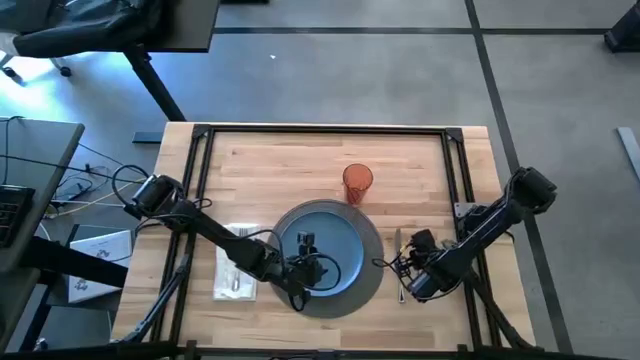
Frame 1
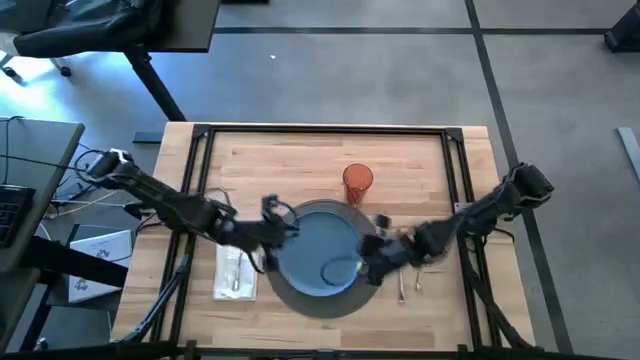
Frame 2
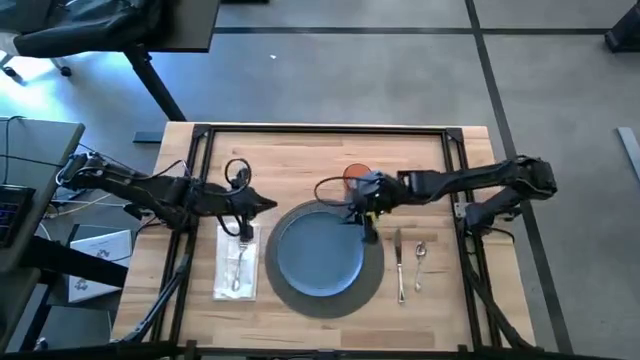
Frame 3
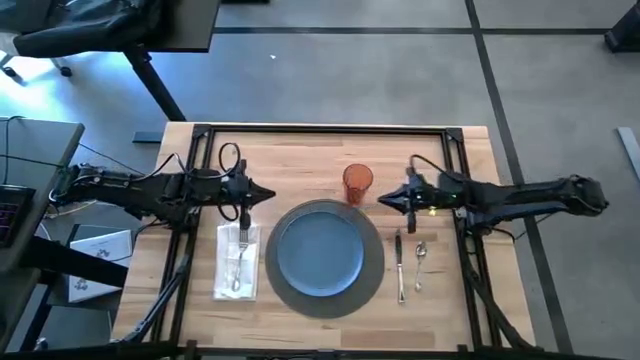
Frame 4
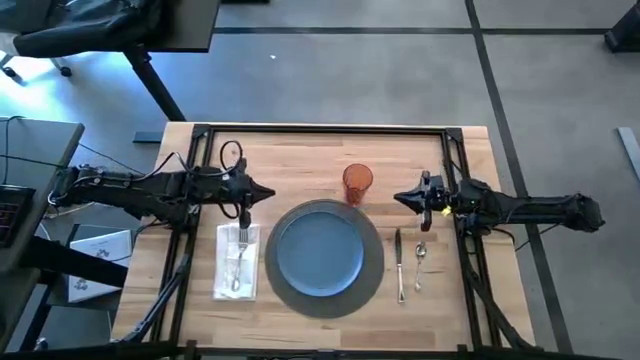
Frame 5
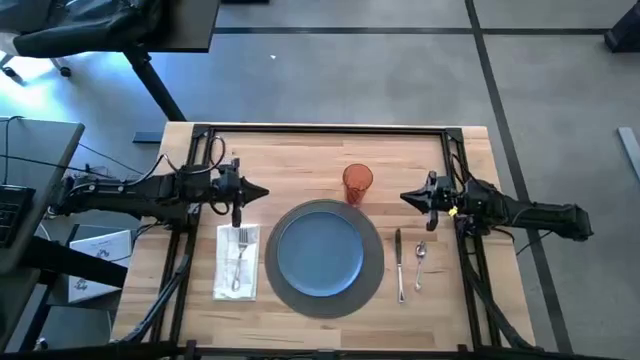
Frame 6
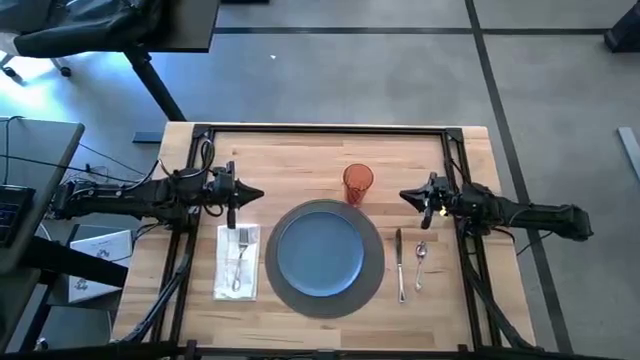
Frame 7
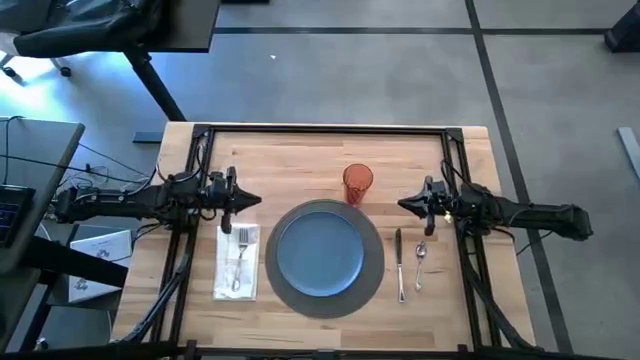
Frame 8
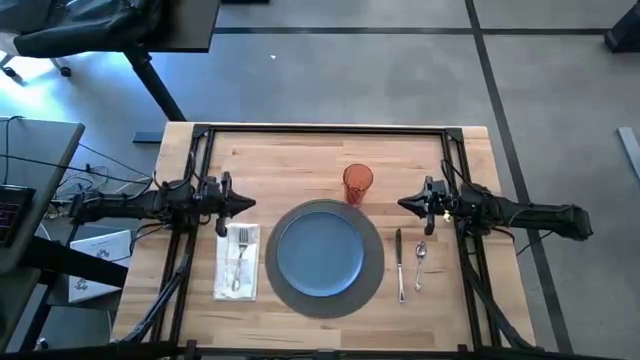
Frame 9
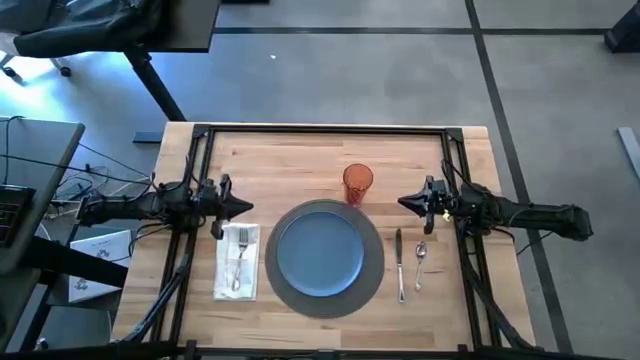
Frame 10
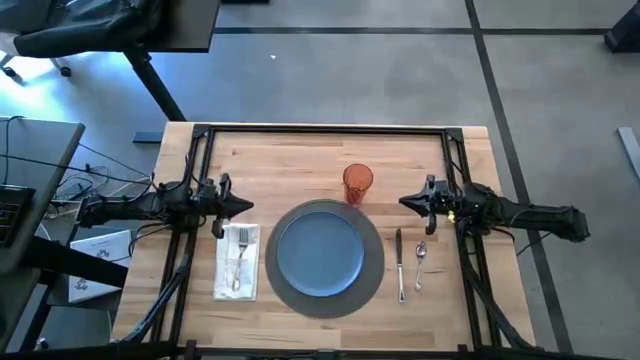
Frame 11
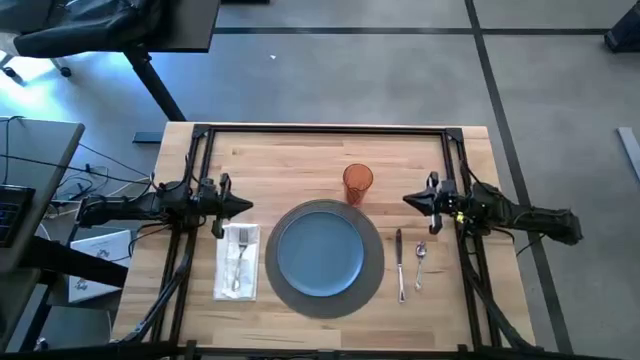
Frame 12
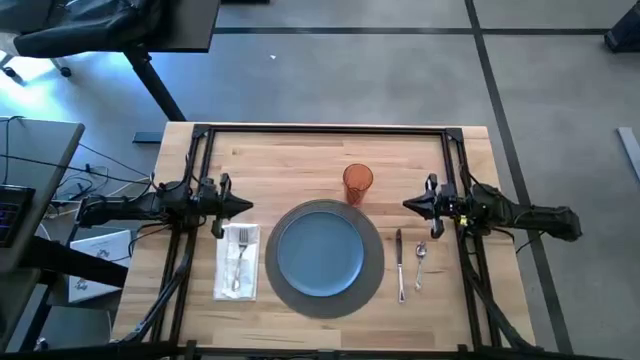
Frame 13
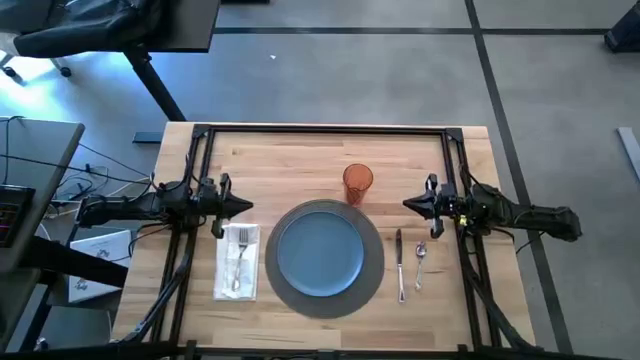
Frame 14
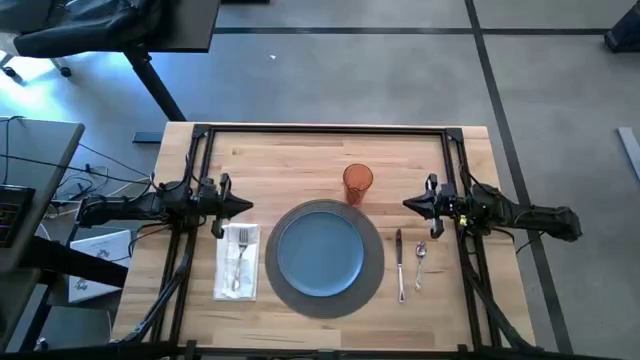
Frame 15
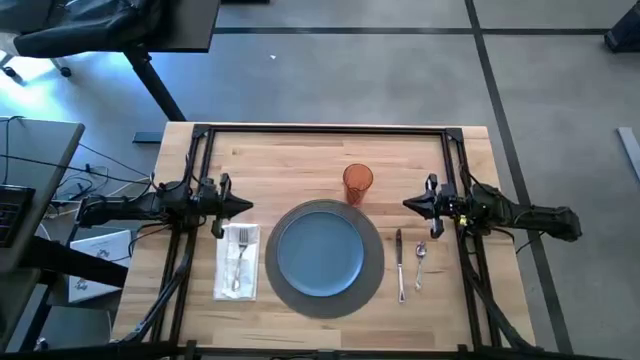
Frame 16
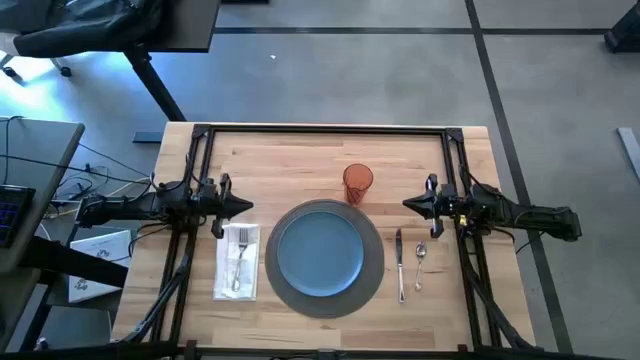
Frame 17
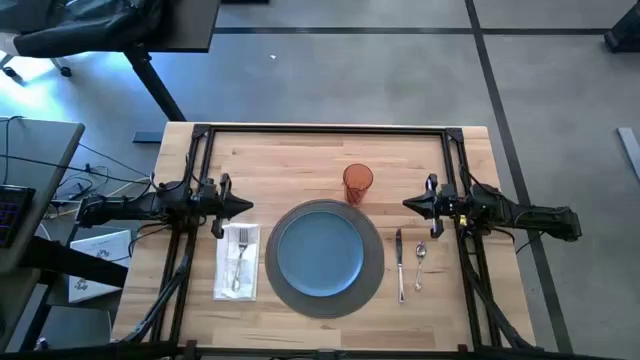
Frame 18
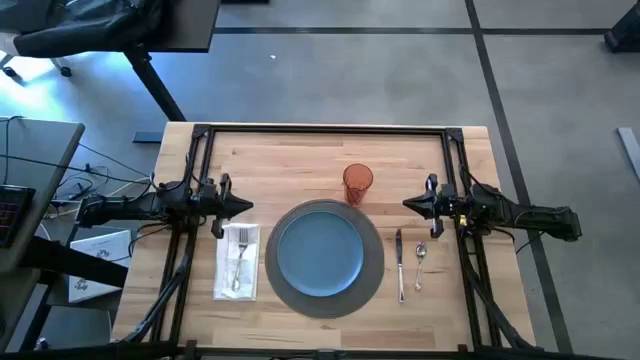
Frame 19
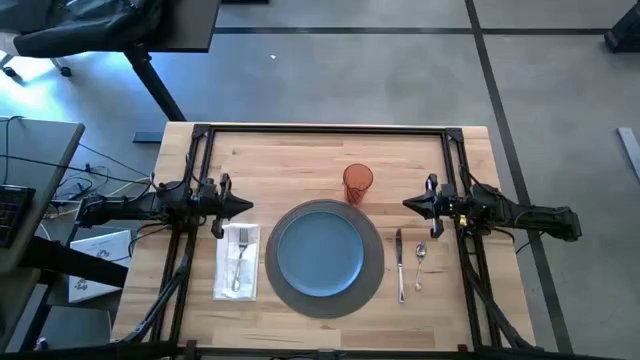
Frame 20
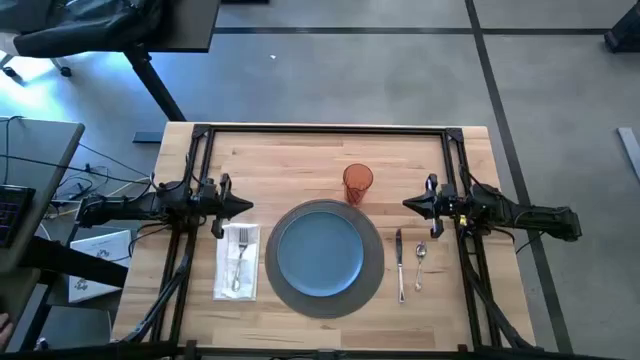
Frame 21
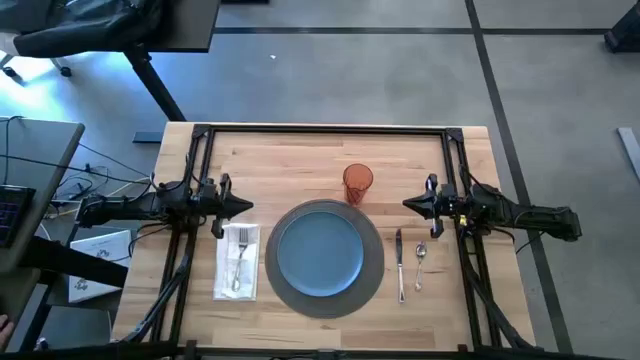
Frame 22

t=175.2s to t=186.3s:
Task: Set table place
Return to Home Position

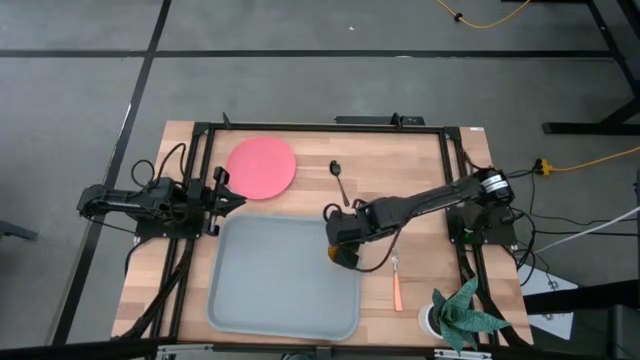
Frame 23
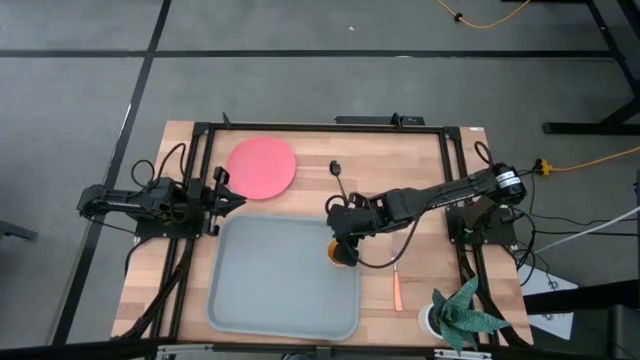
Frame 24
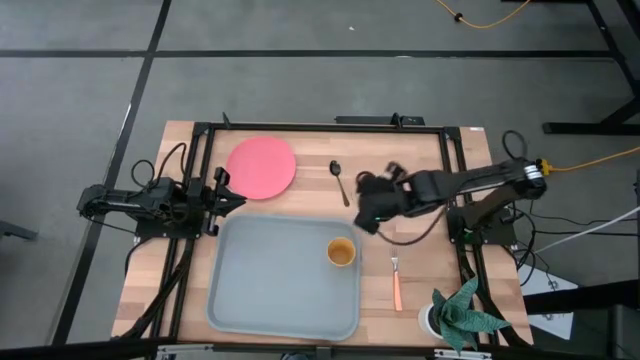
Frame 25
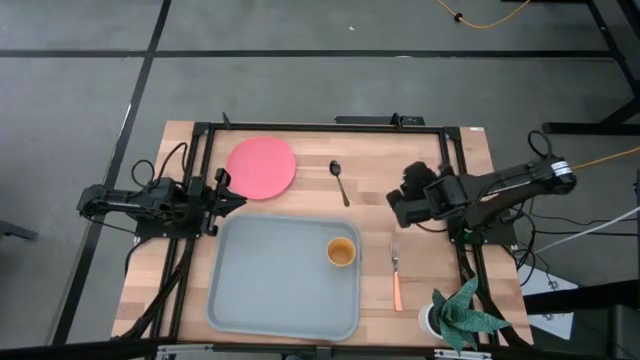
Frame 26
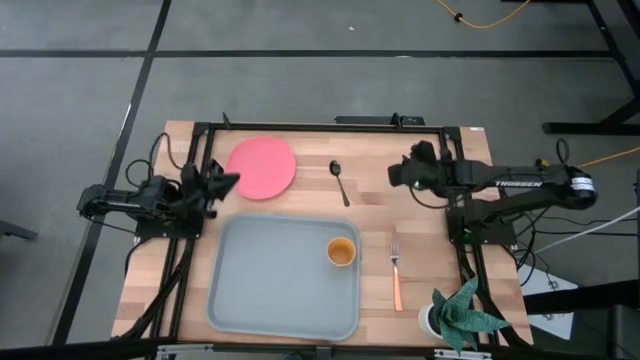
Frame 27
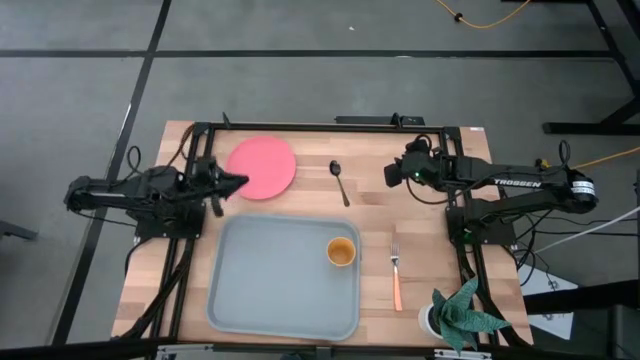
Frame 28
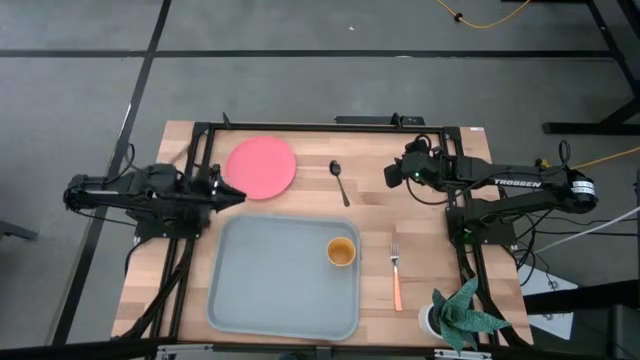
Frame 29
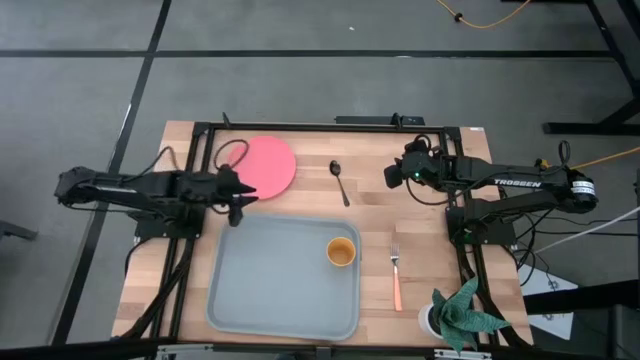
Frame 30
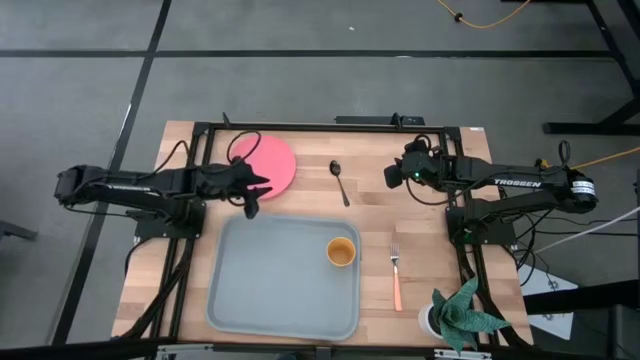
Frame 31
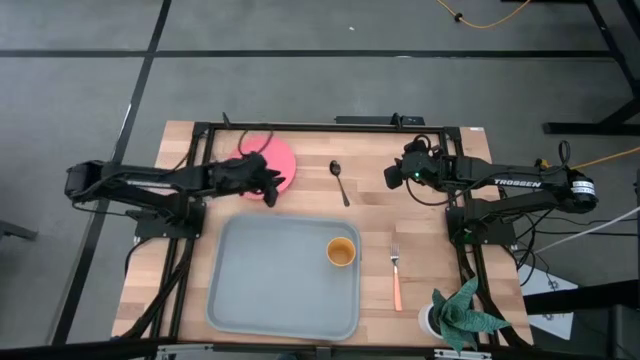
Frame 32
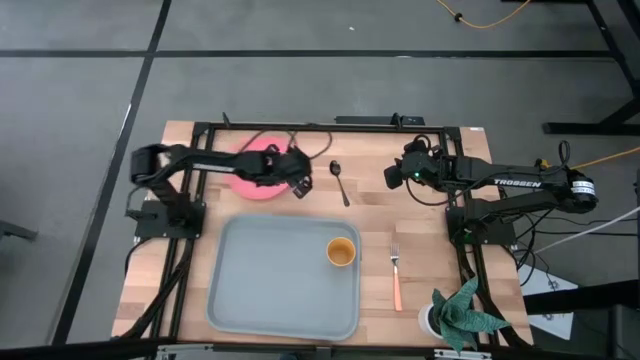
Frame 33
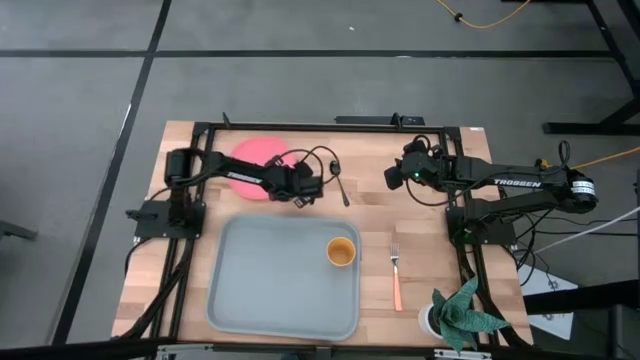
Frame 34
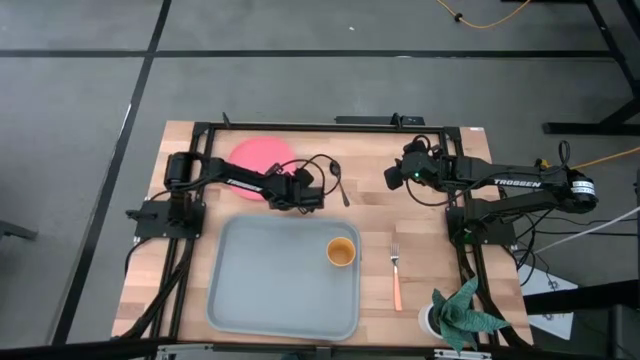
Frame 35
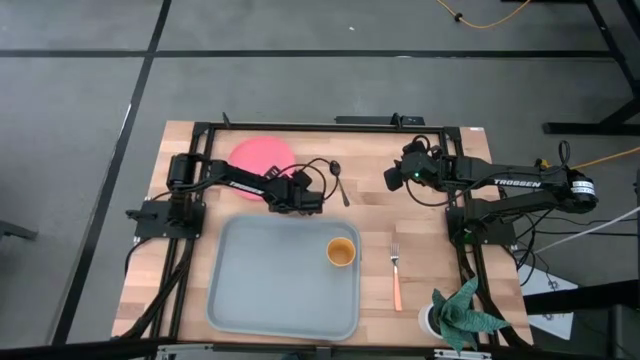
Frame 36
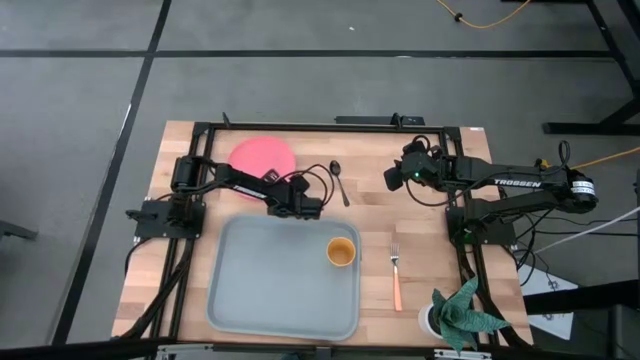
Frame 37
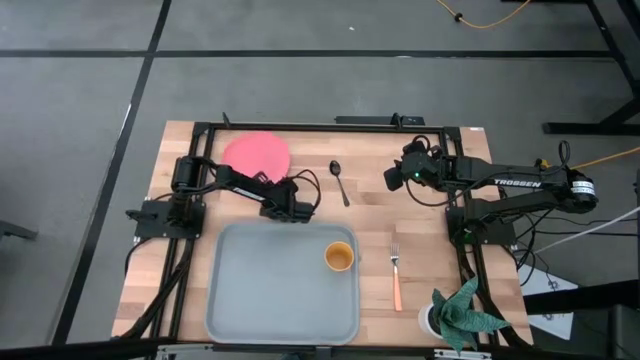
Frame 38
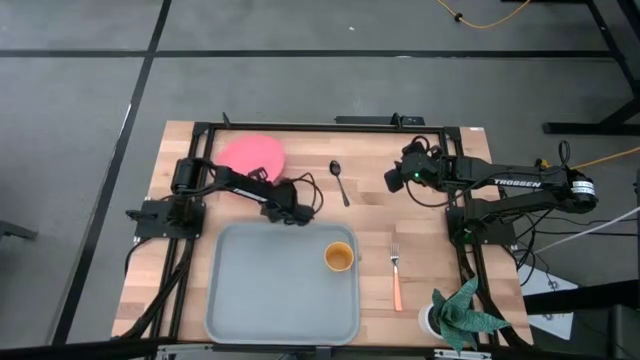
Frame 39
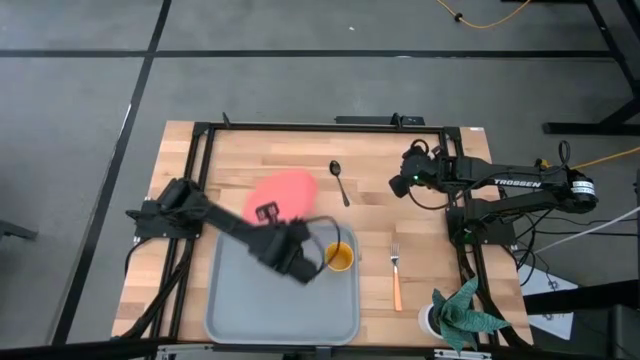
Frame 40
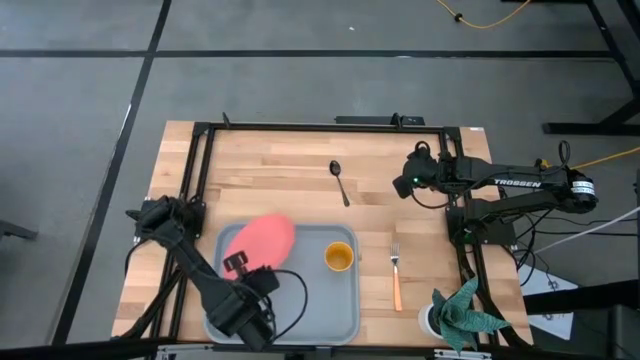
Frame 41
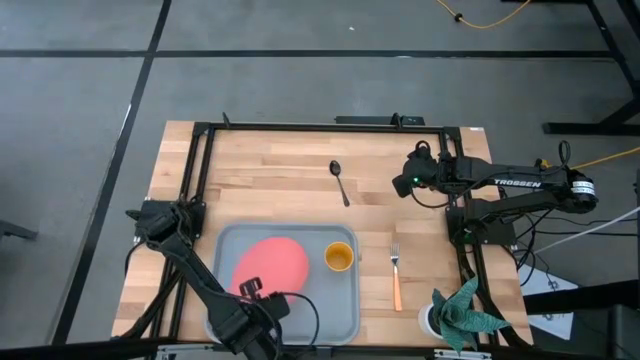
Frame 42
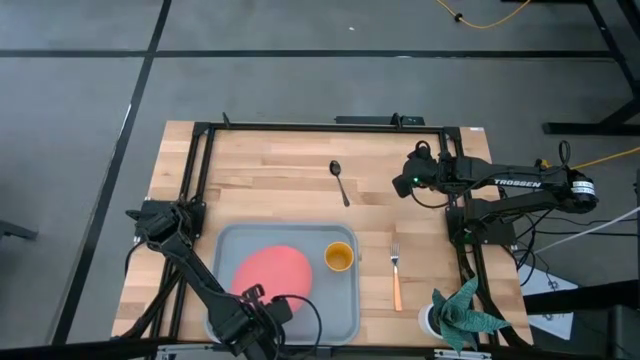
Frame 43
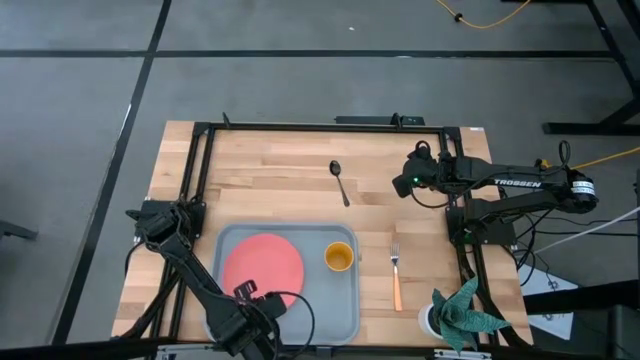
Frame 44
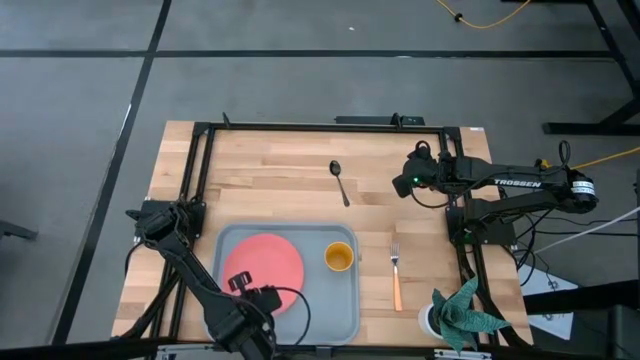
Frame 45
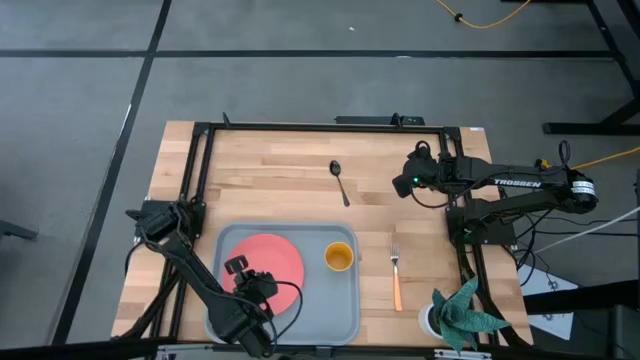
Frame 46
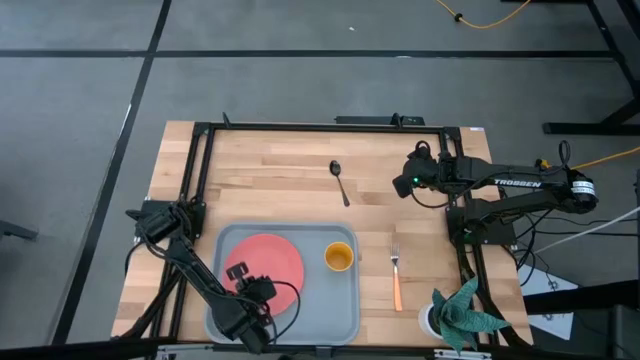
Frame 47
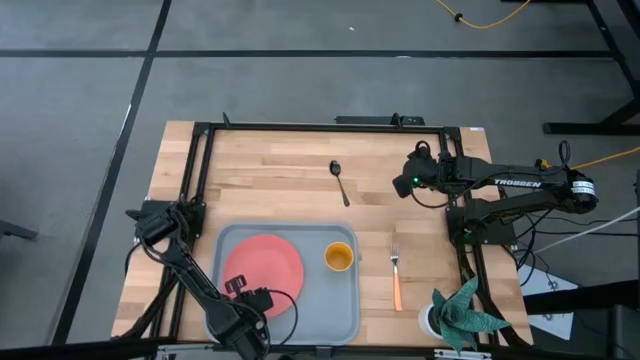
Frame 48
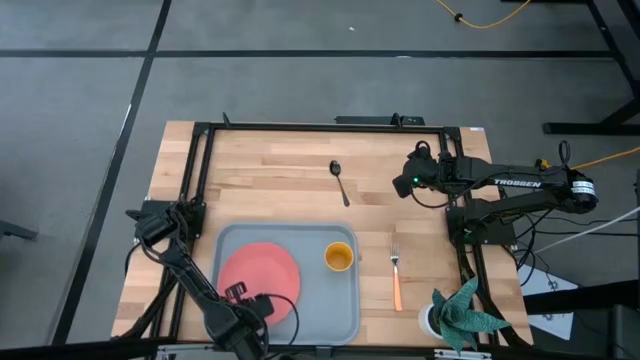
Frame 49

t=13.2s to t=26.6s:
Task: Pick and place plate/cup/fork/spoon on tray
Put the pink plate on the gray tray to the left of the yellow cup
